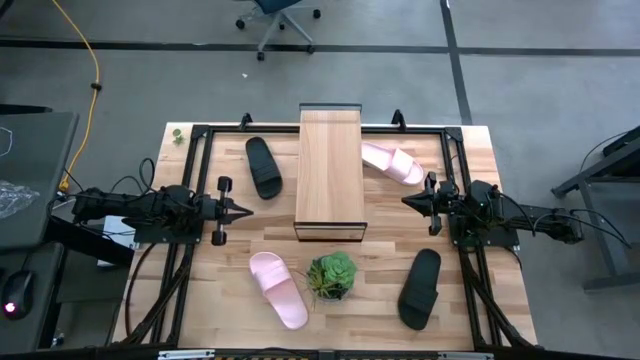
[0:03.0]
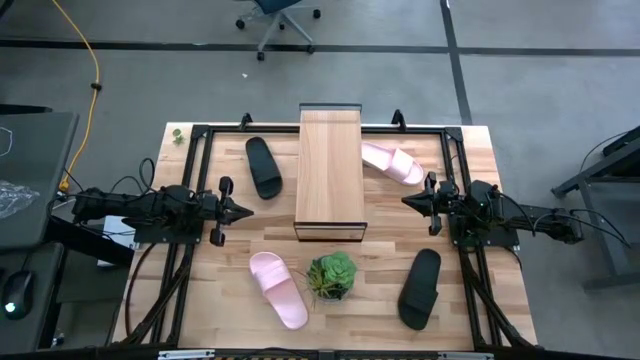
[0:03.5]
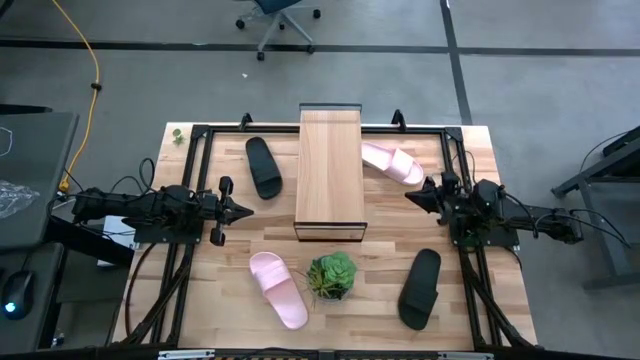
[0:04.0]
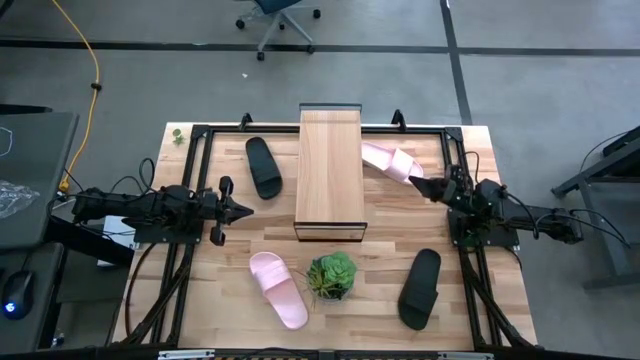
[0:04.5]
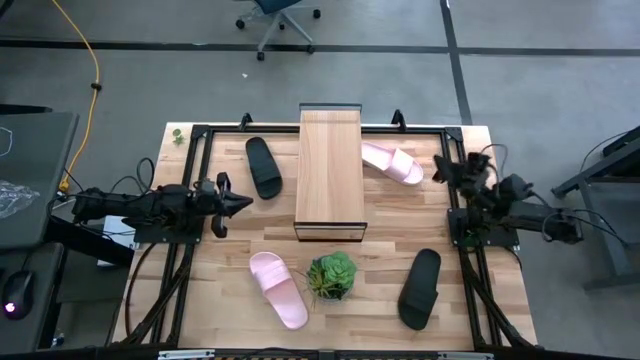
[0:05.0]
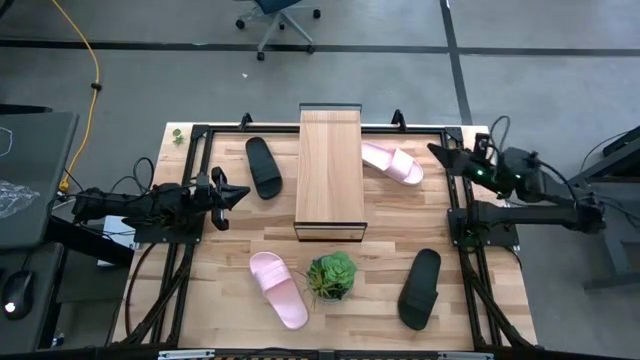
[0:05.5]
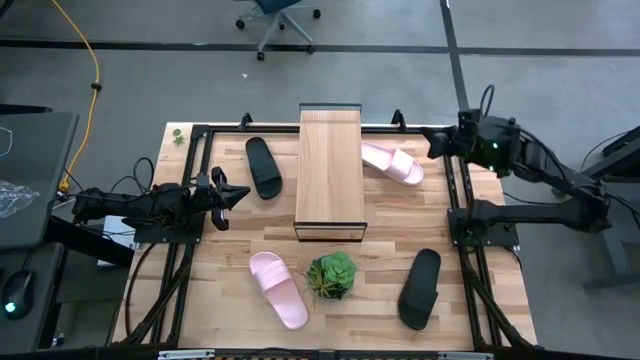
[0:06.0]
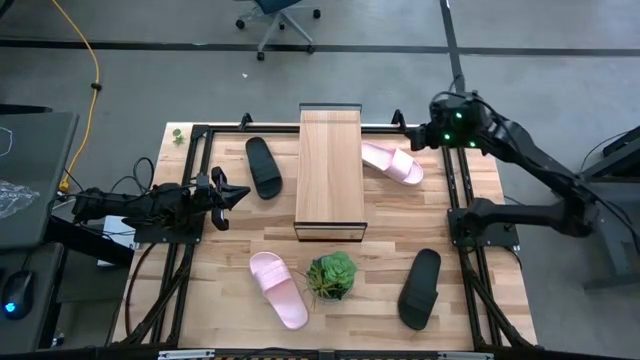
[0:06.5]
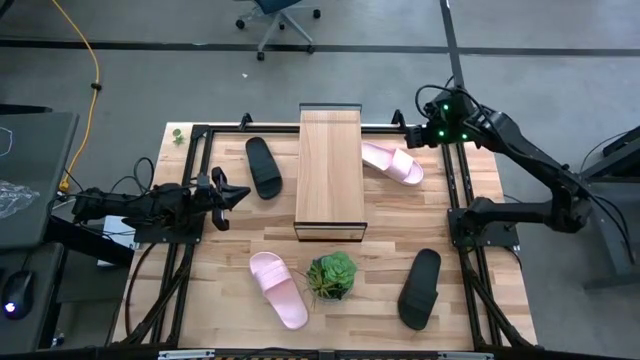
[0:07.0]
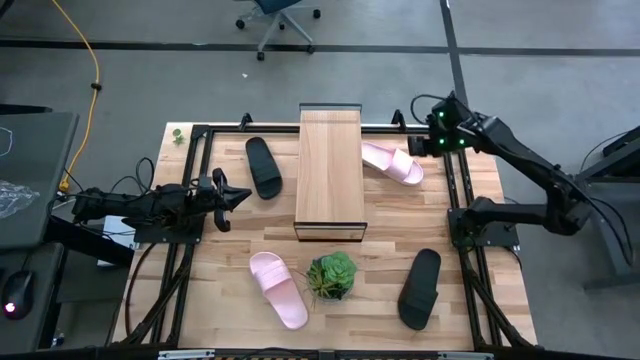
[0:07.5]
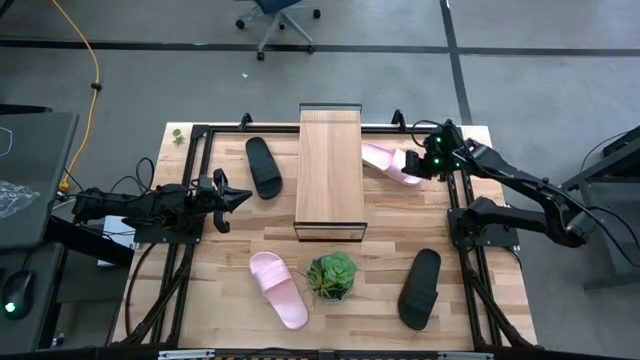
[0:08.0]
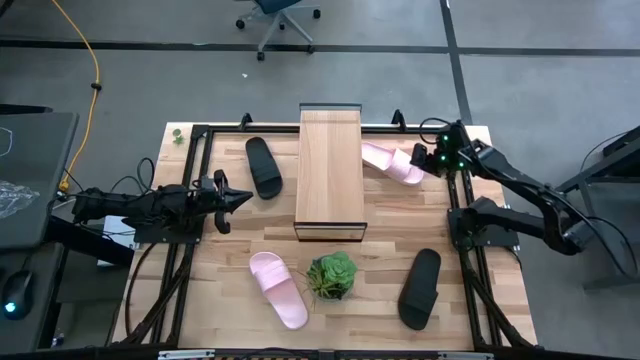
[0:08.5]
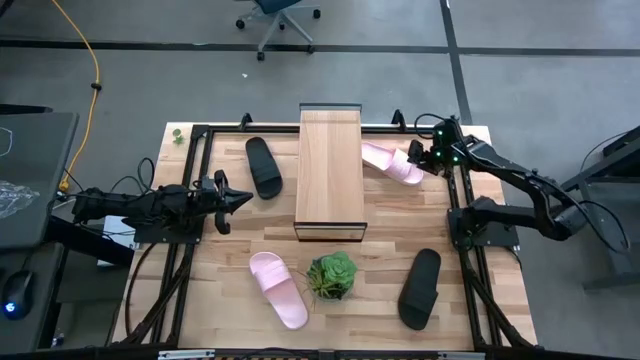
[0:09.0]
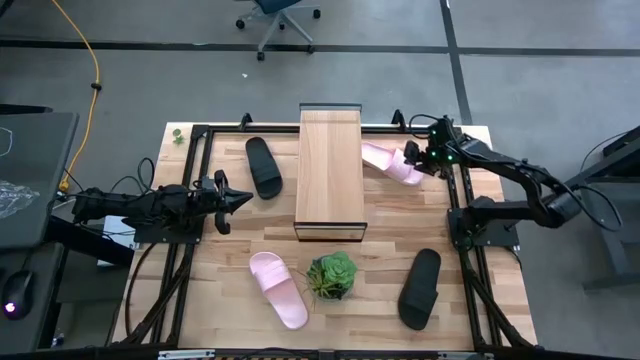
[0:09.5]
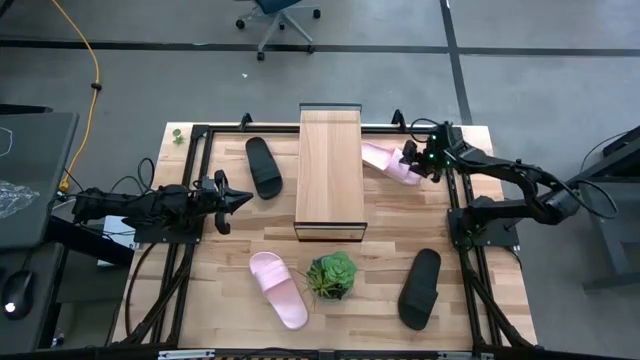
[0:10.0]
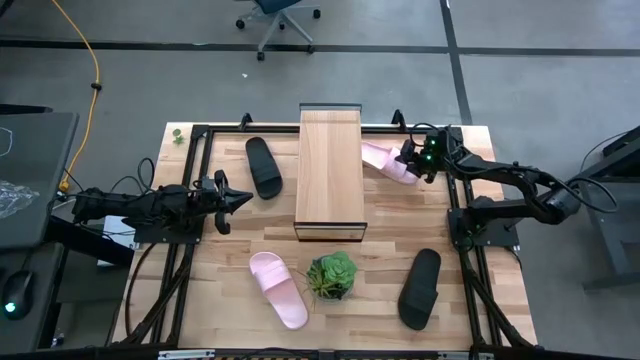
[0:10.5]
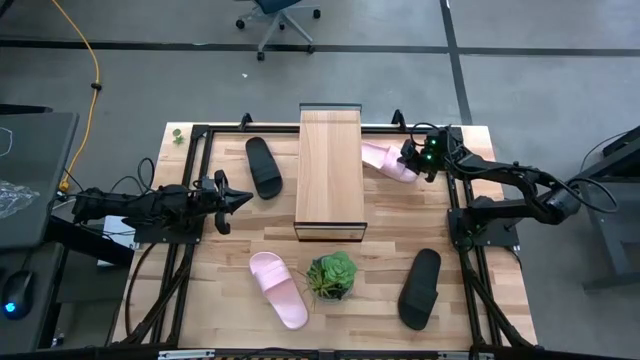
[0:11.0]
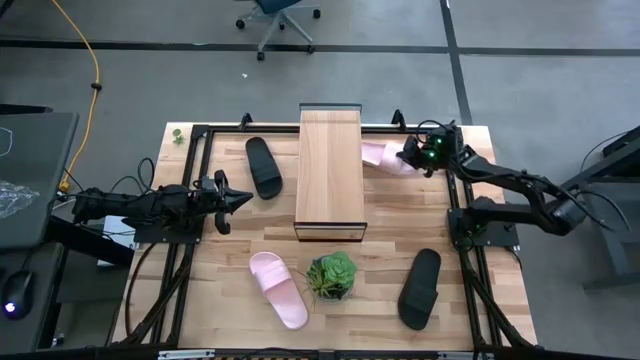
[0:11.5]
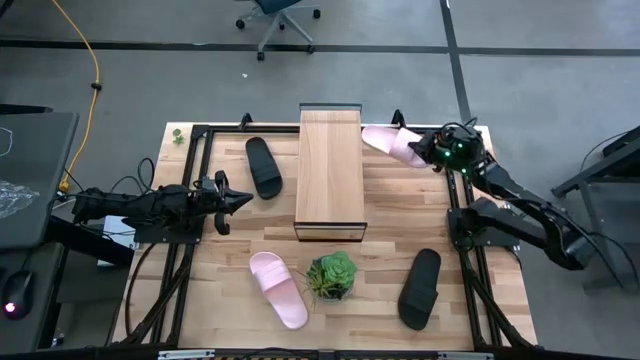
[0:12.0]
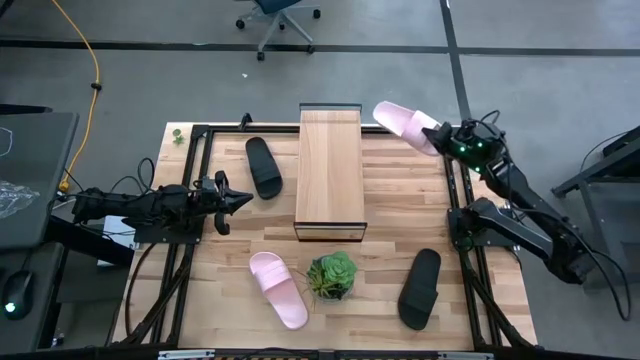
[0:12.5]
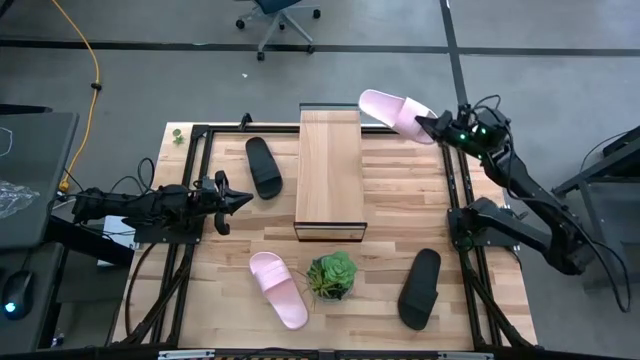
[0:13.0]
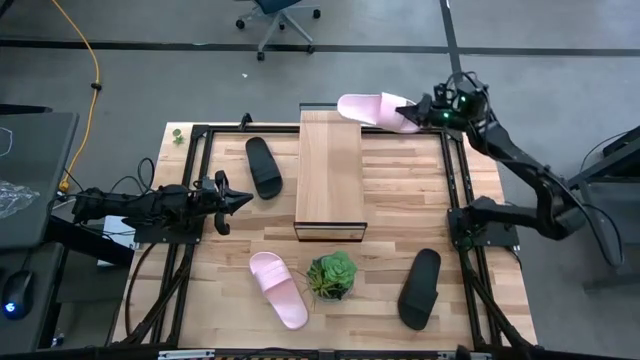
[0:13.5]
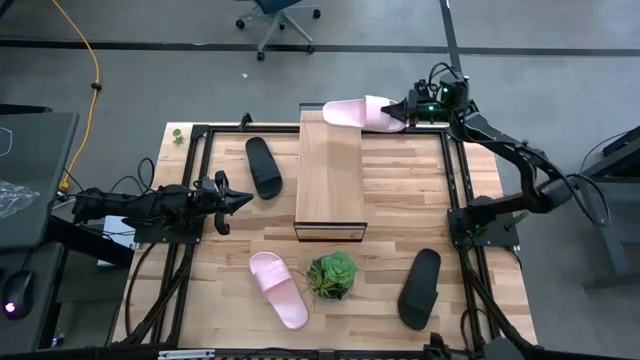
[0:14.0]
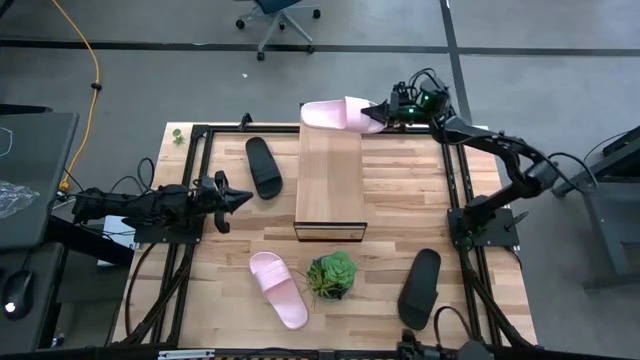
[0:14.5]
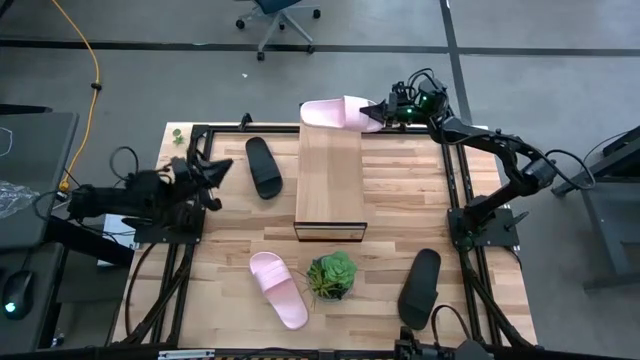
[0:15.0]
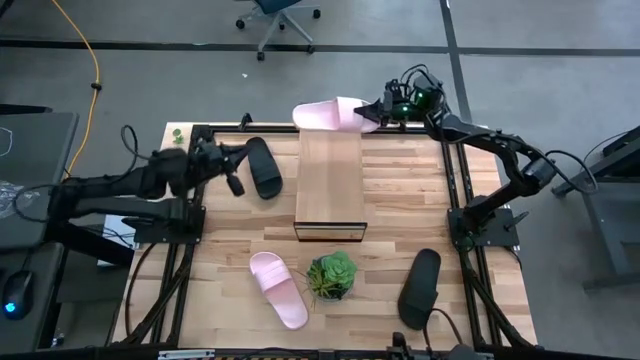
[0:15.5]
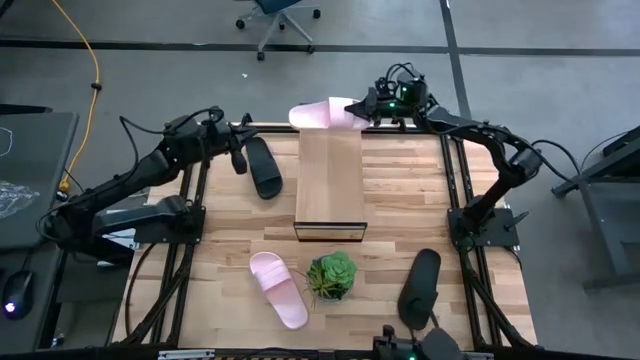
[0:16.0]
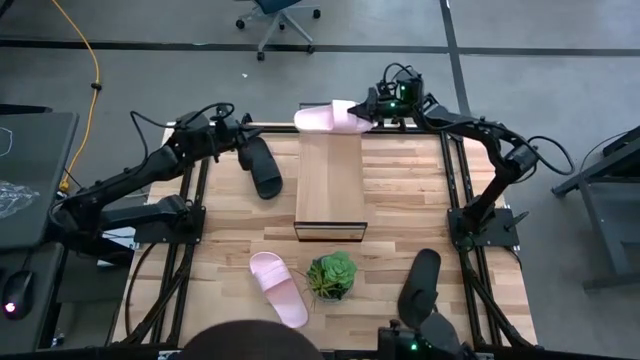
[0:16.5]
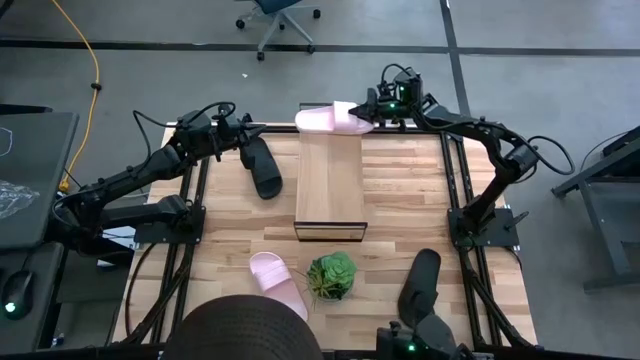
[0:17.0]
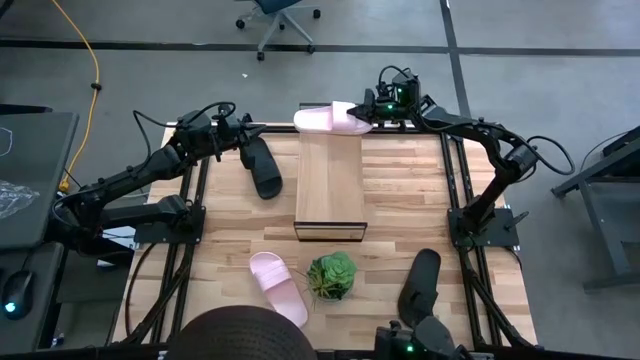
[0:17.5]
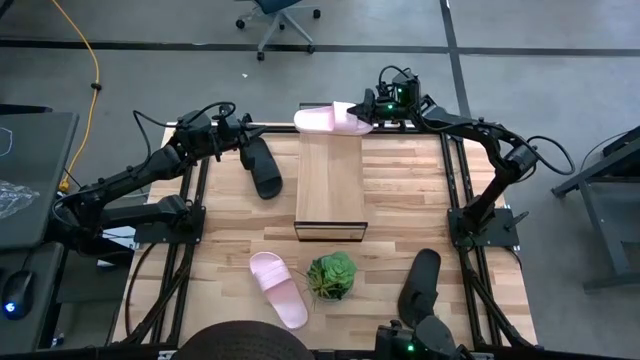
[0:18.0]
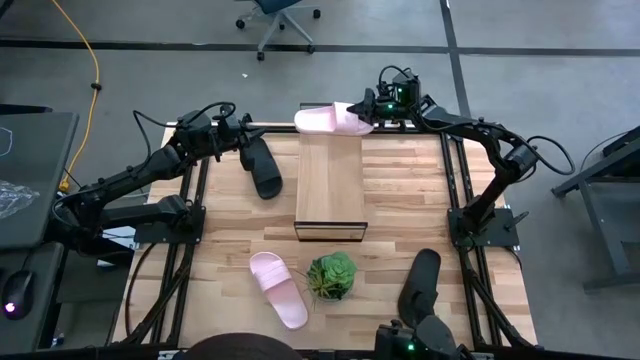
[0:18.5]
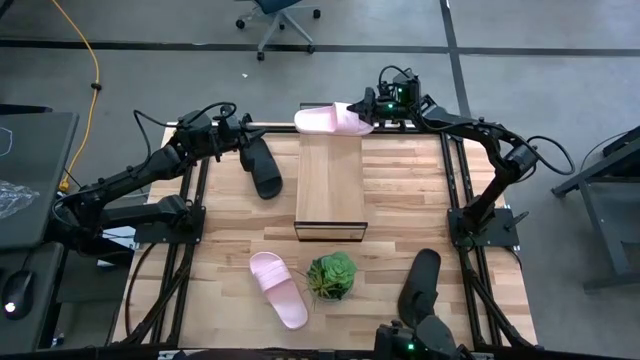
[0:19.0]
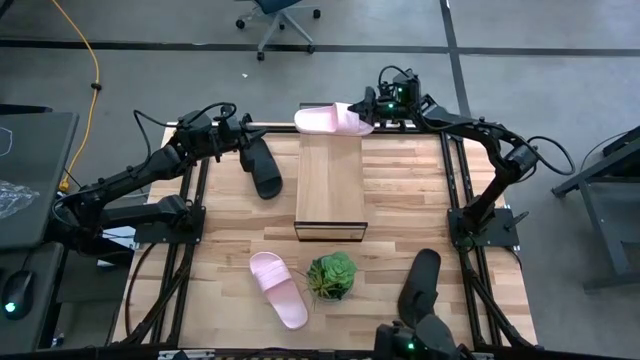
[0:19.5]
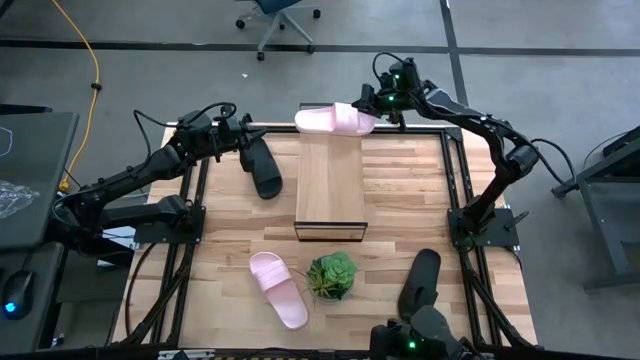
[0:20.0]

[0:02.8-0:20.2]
Task: Pick and place slides into the shelf
Put the top pink slide on the shelf
